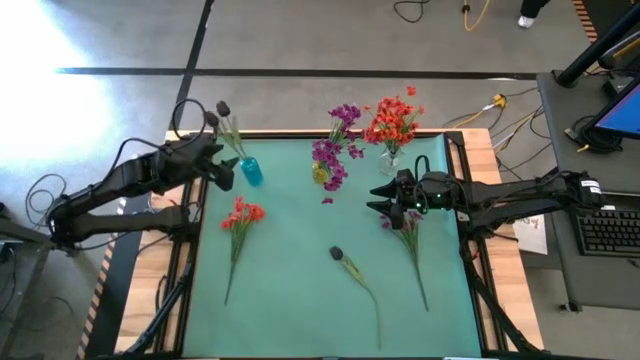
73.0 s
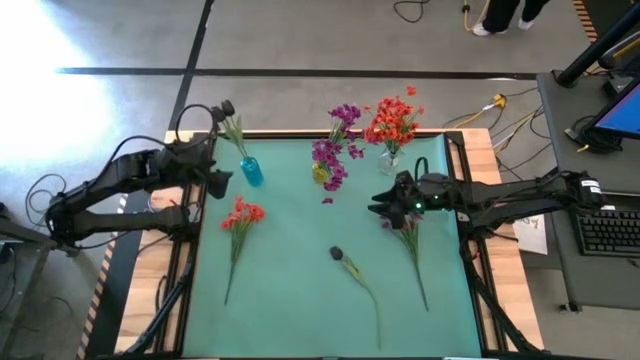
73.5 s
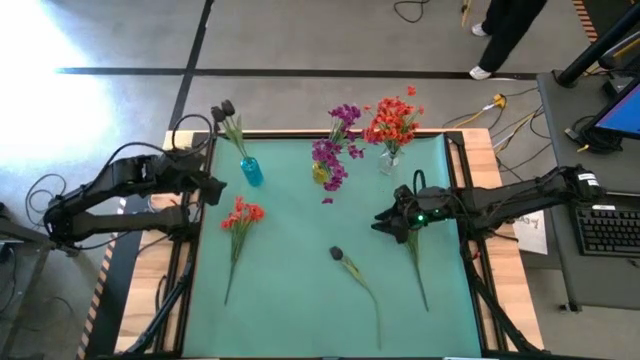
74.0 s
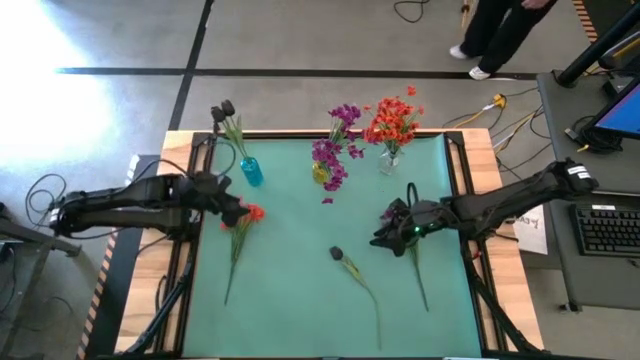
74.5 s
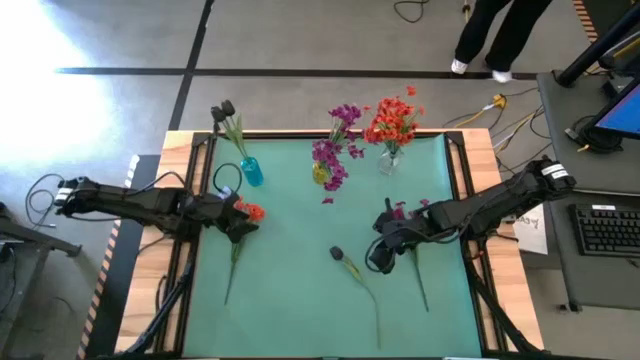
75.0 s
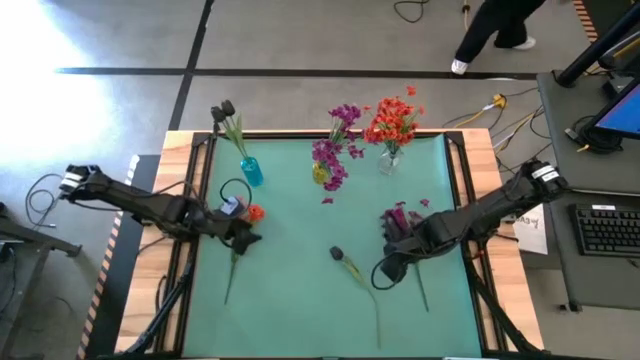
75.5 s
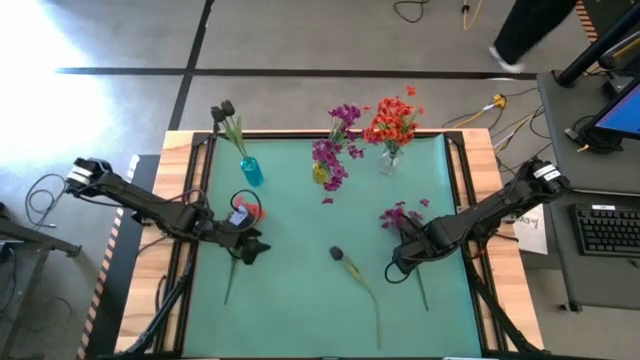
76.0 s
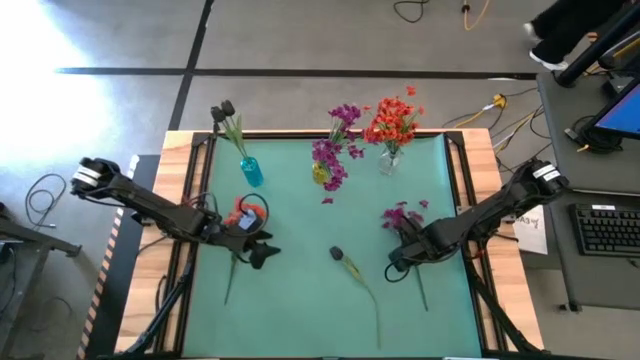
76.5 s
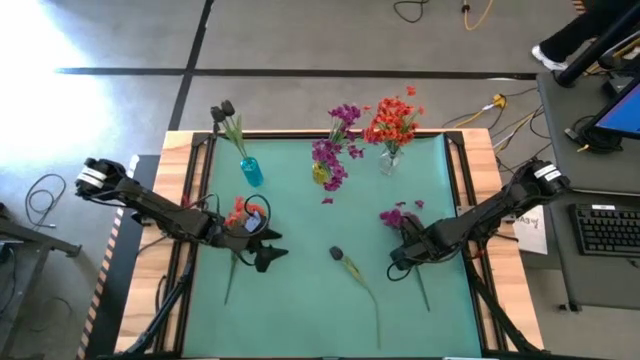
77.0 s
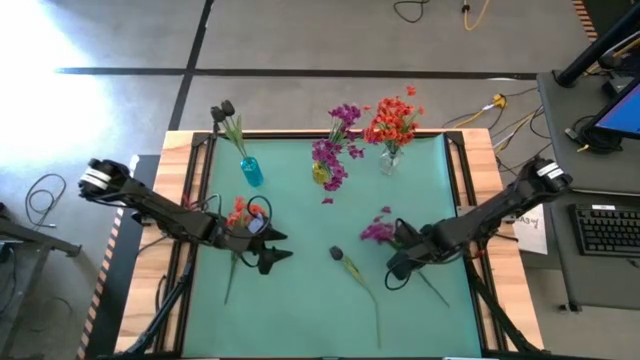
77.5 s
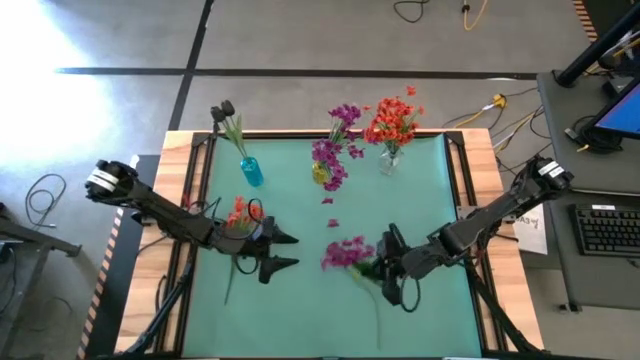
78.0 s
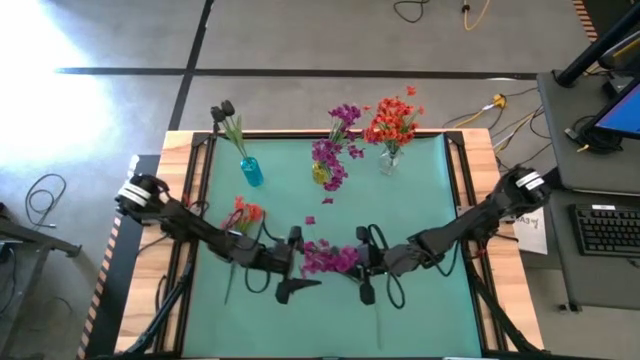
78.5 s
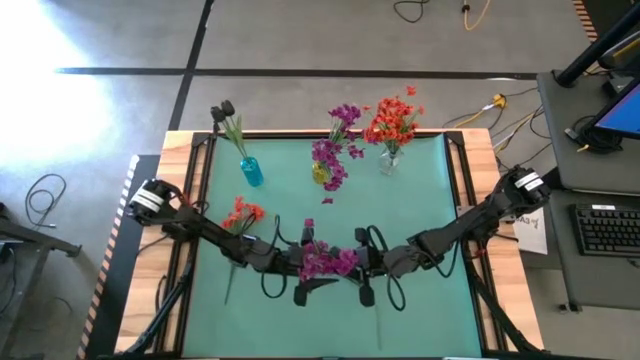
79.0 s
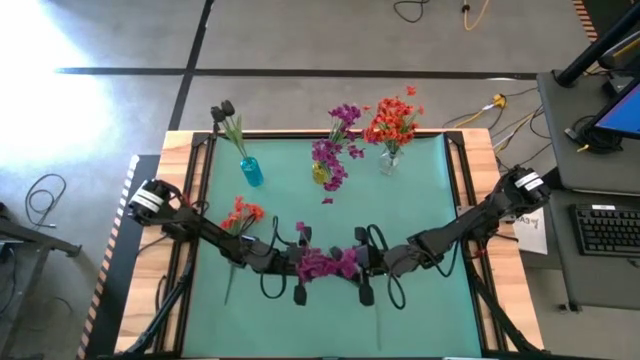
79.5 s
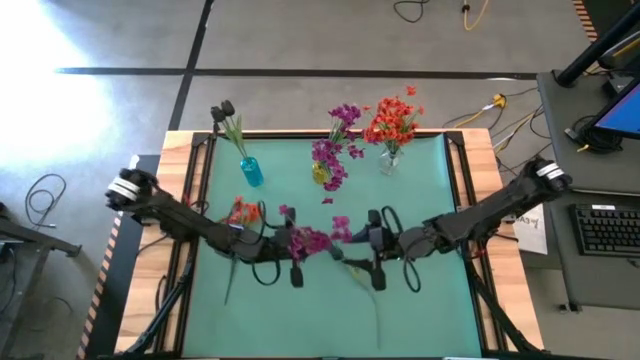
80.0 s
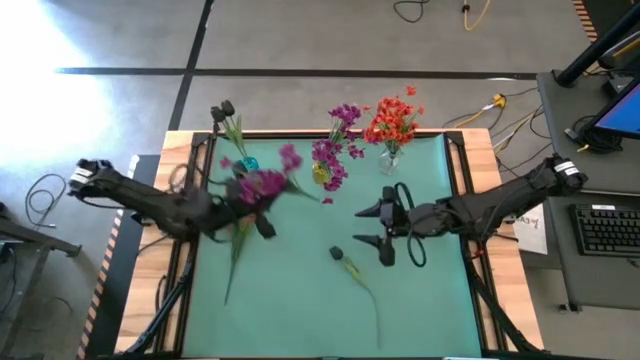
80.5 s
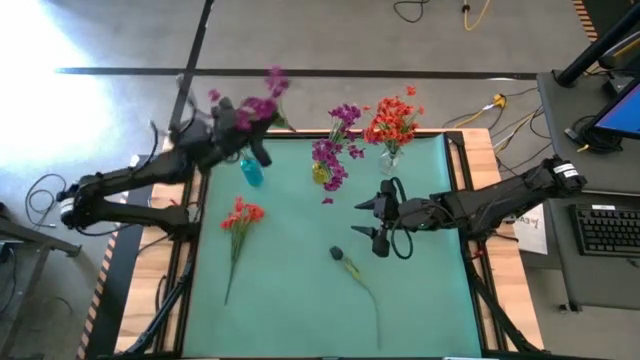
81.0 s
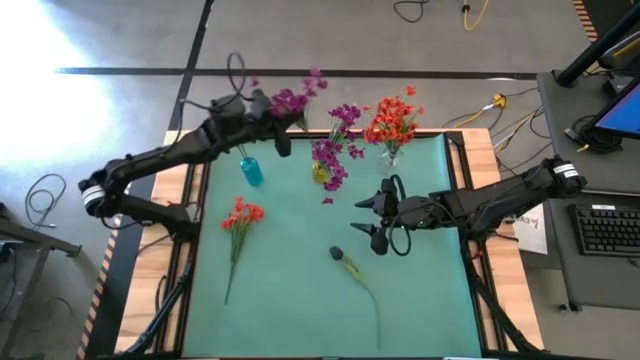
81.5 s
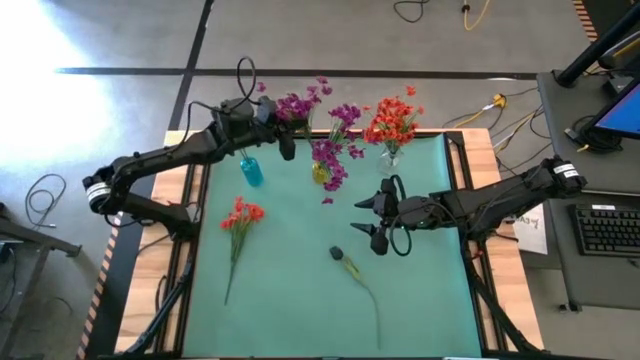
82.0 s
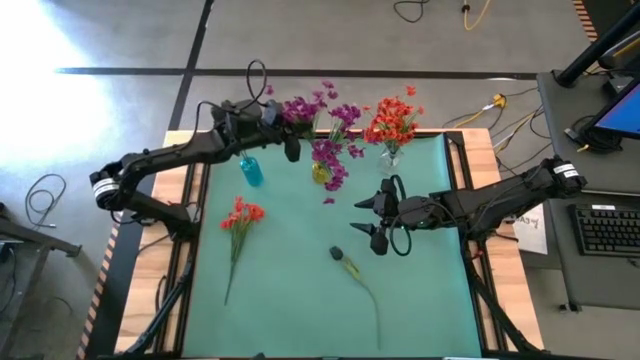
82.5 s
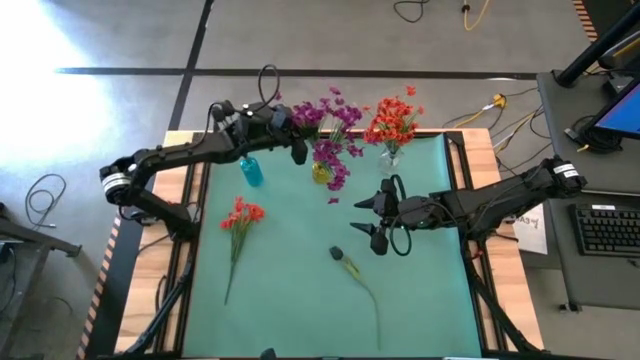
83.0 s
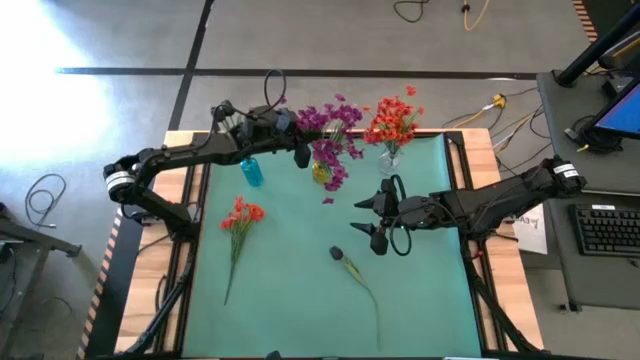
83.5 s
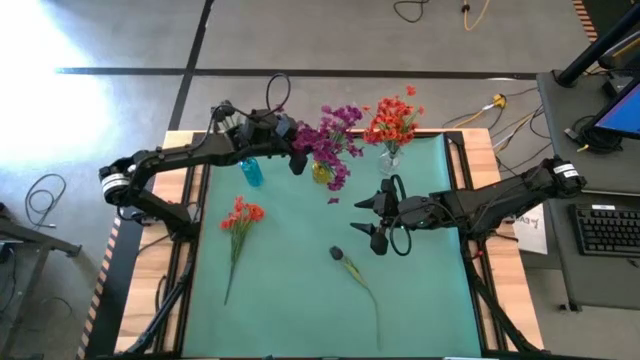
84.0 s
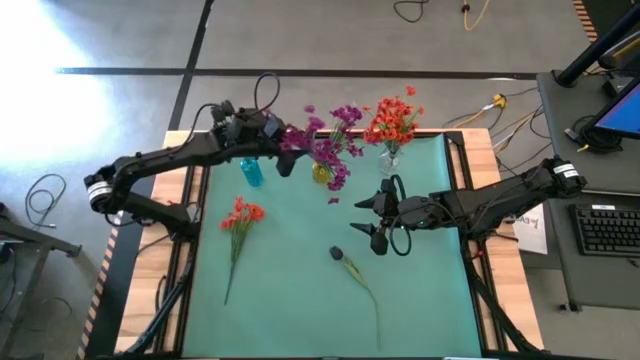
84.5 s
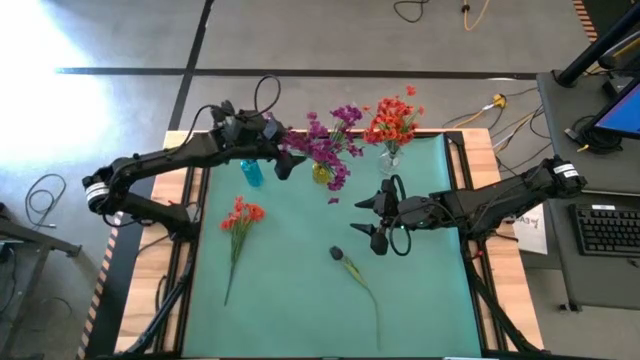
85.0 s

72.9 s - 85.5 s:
Task: Sort flowers into vase by color
Put the purple flowers into the yellow vase

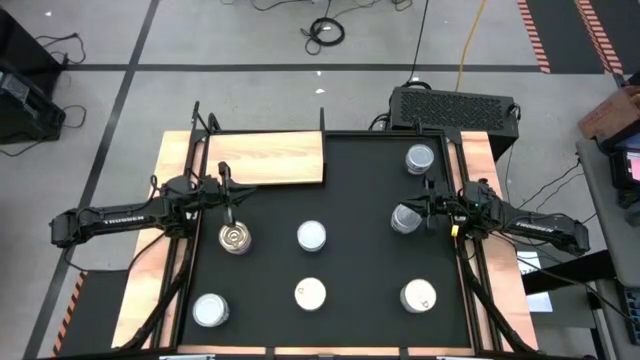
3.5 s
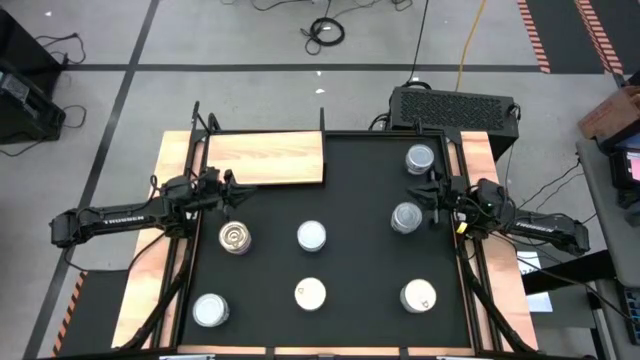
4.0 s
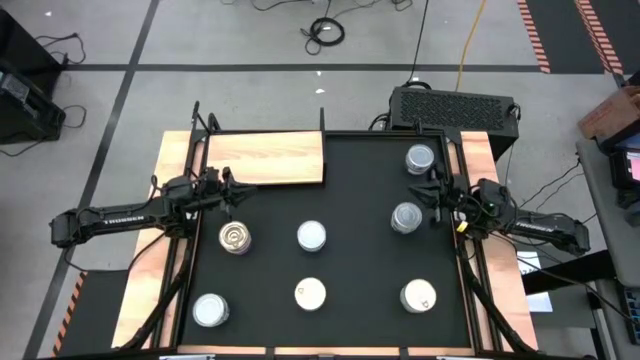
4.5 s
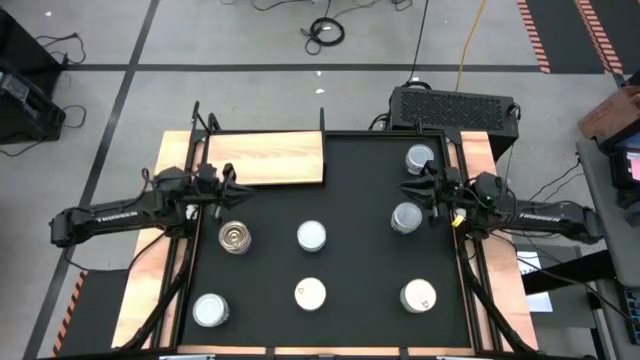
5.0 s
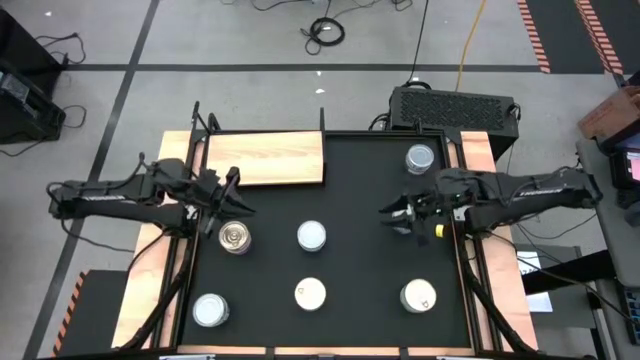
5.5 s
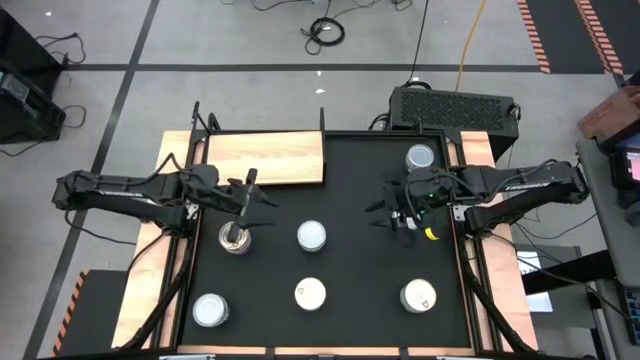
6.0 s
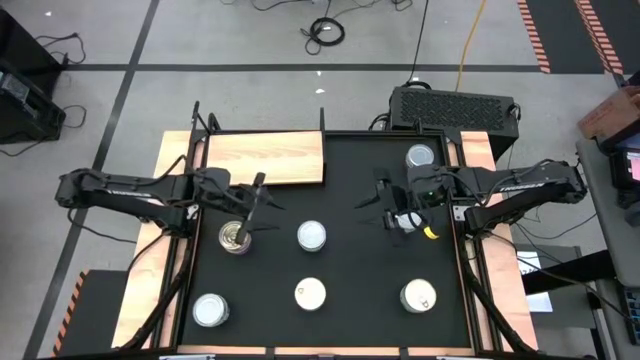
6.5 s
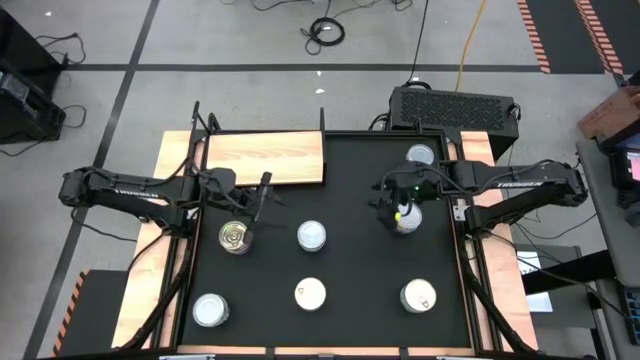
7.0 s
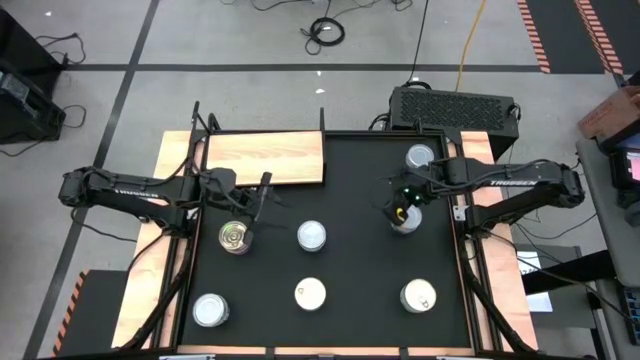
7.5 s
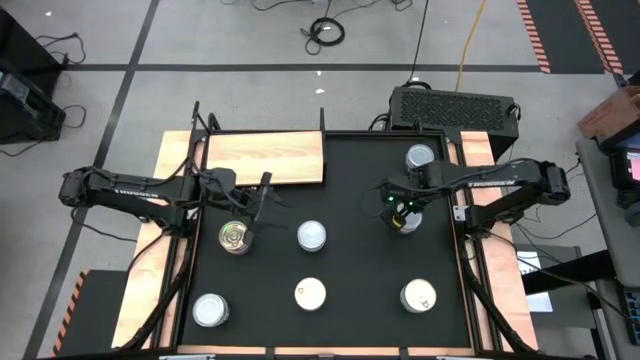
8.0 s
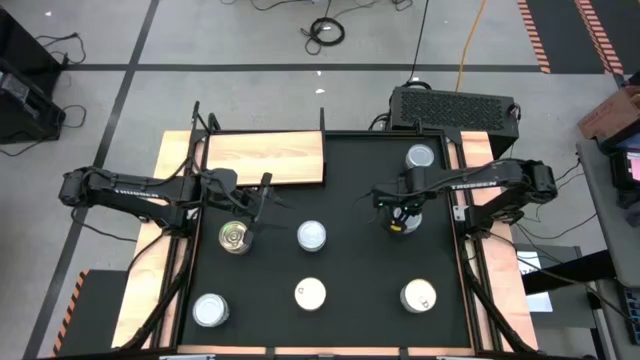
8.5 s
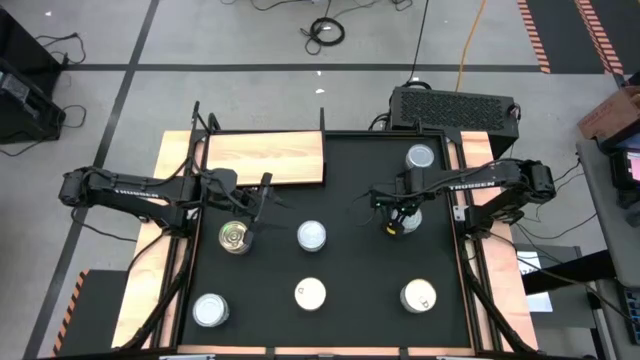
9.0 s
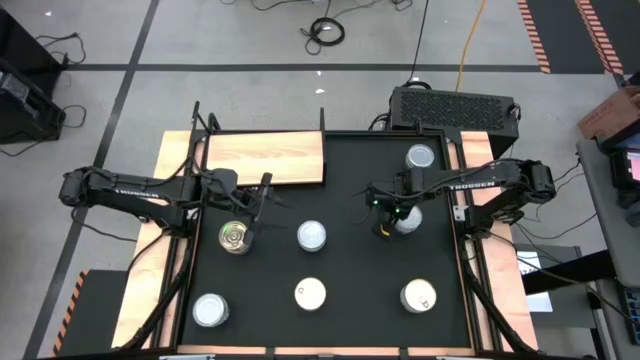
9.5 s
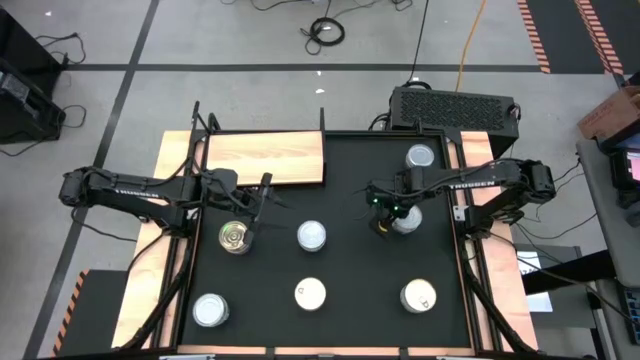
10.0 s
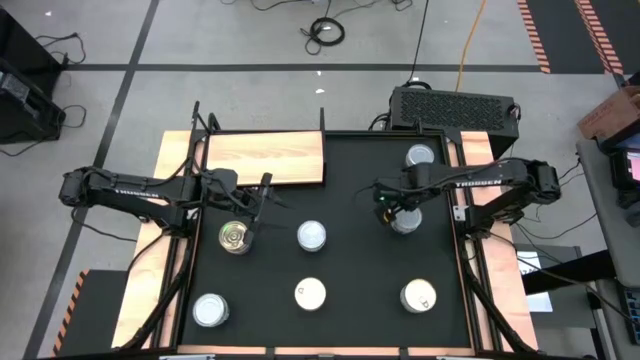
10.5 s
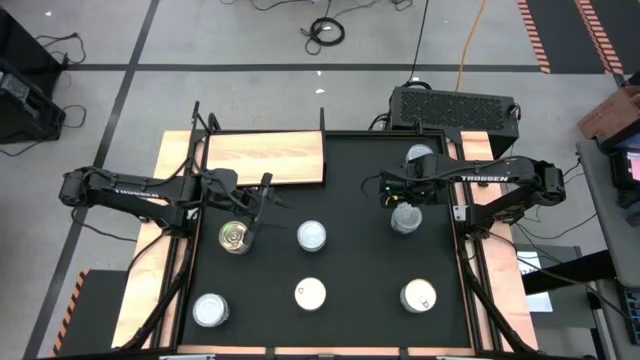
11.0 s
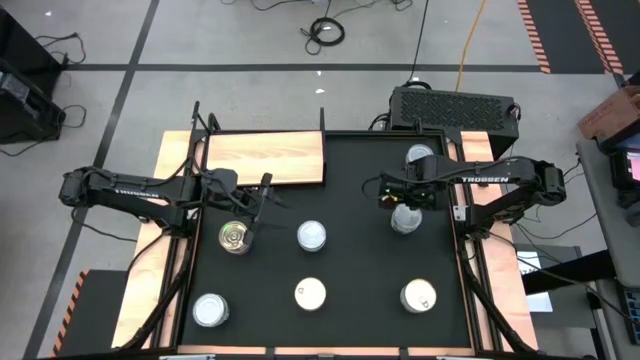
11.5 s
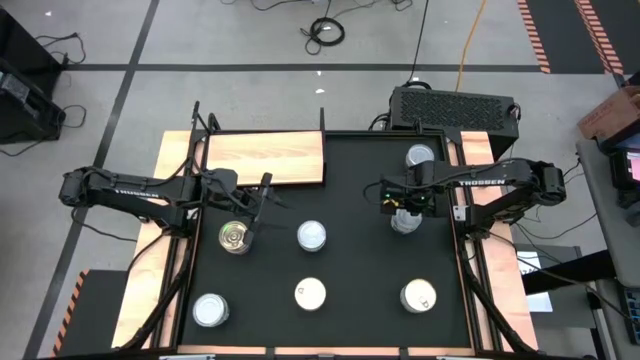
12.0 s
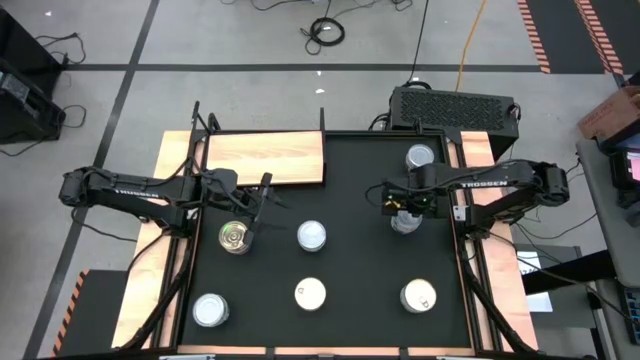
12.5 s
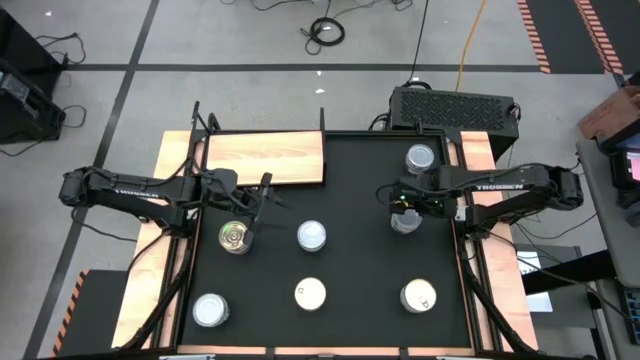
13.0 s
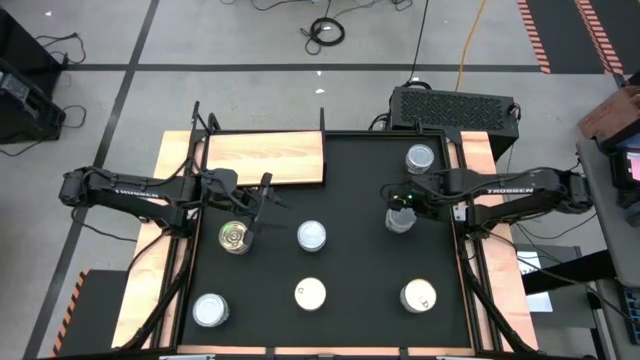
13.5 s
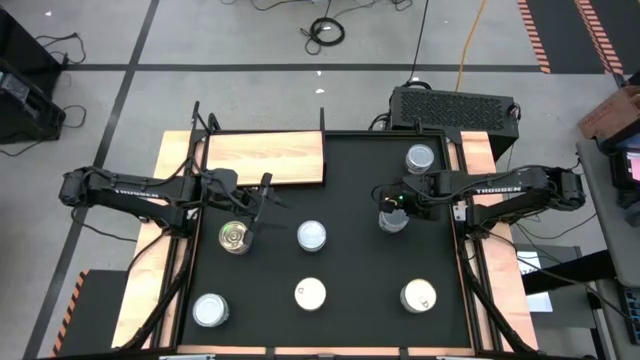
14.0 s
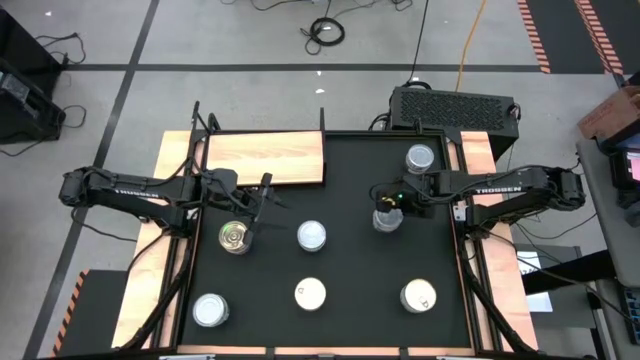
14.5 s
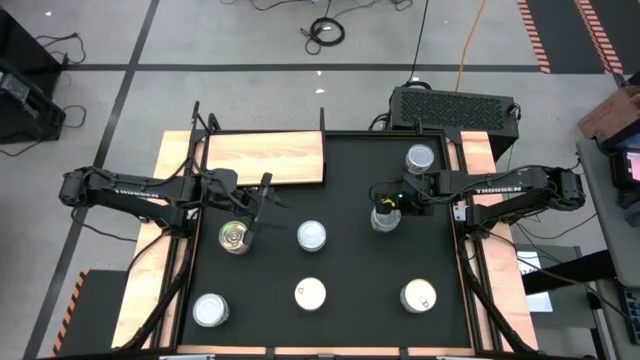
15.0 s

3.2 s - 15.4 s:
Task: Stack canned seafood by type on shelf
Remove the green and white tuna can from the blue and pink tuna can on the table
